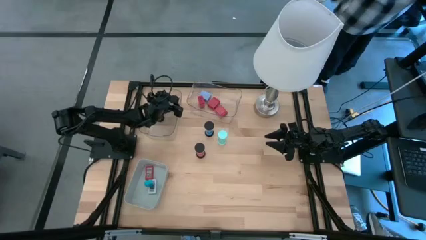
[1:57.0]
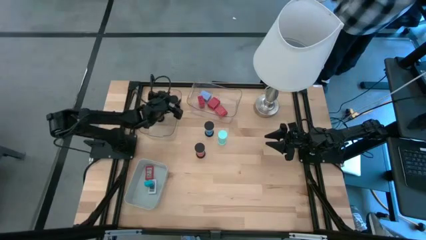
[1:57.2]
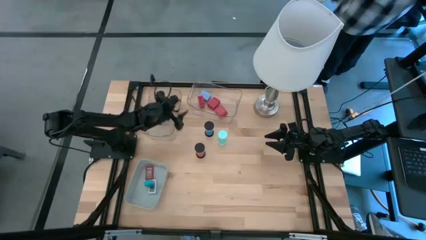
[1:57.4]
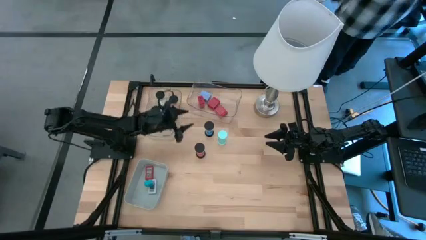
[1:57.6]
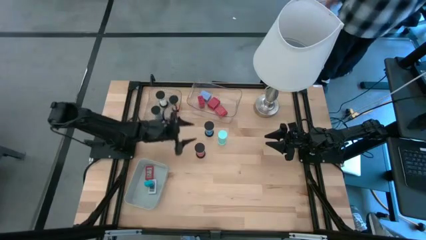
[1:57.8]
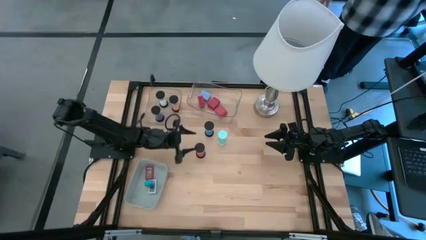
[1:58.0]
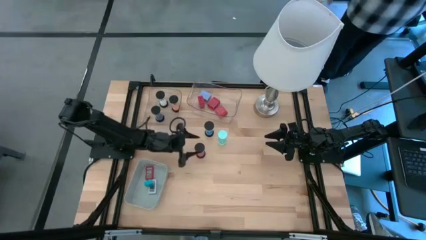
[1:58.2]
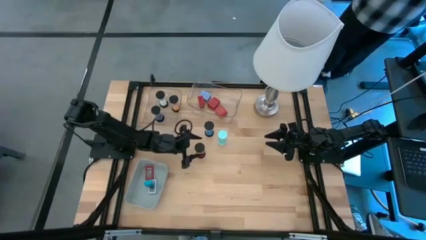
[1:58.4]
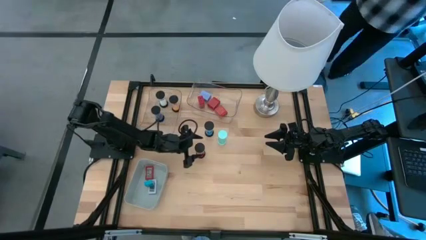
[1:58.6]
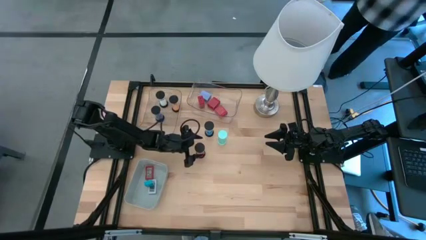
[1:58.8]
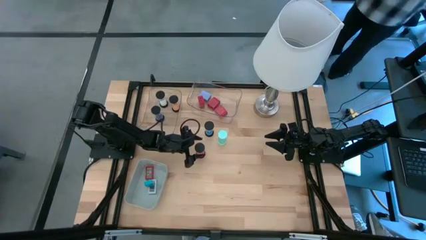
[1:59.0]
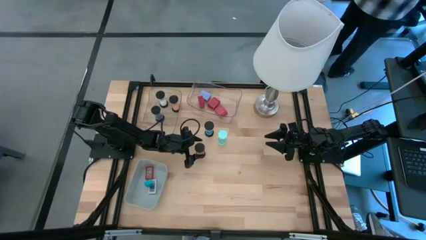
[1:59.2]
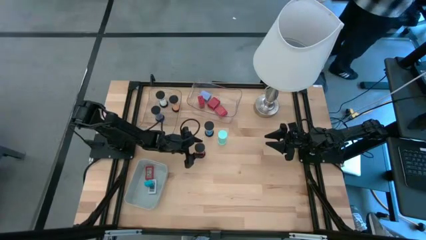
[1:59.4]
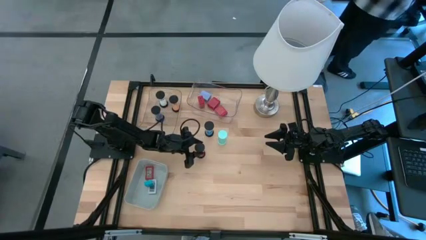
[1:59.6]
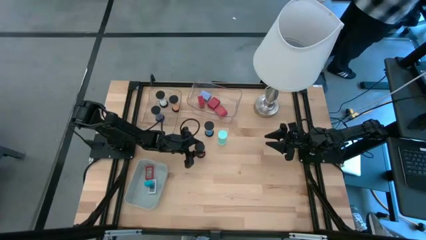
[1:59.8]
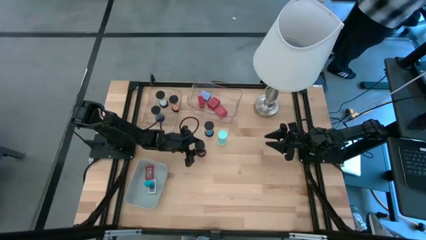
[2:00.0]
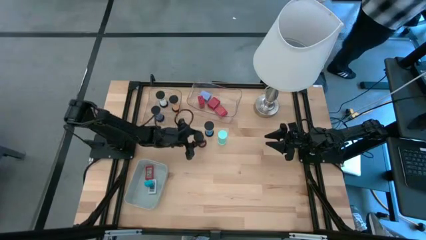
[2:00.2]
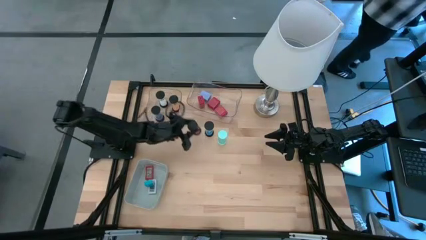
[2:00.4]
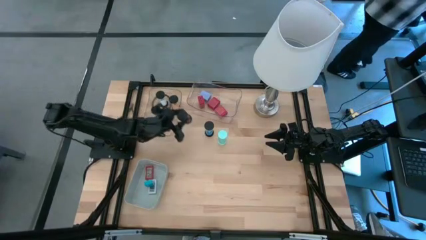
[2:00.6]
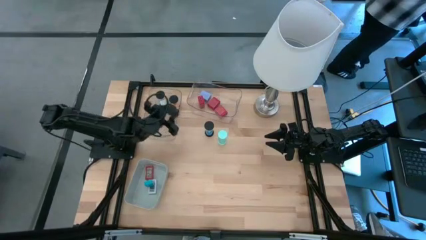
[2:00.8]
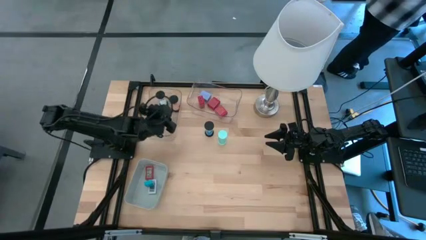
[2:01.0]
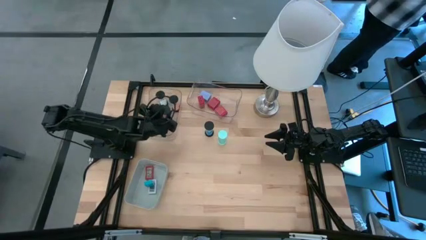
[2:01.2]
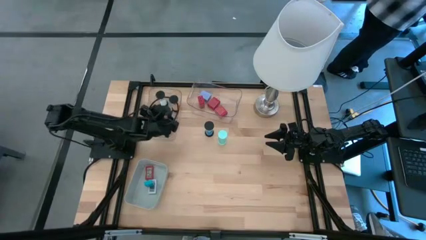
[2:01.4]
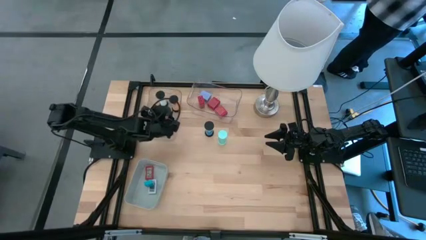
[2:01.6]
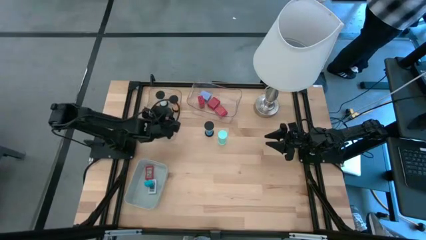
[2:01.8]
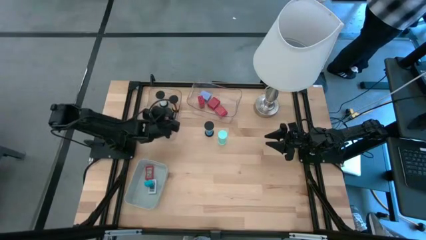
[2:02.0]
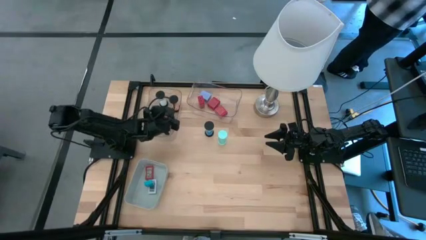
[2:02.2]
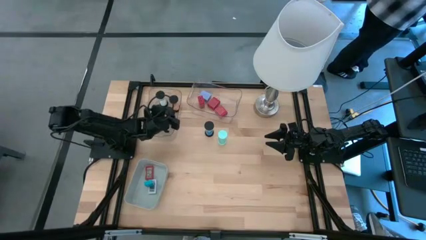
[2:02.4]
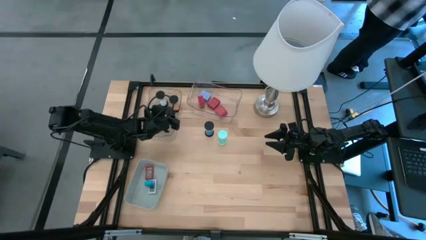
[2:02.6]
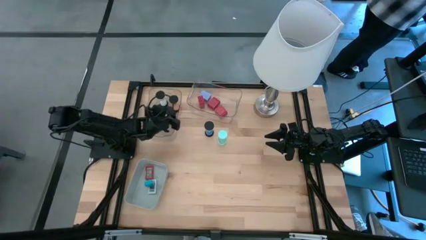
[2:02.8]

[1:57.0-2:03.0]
Task: Pick & Place Office items
Put the pink hourglass into the left transparent bin

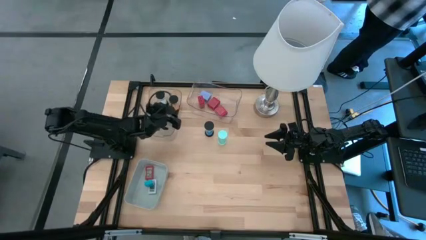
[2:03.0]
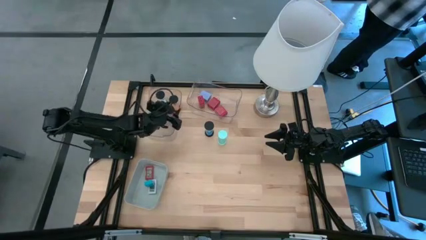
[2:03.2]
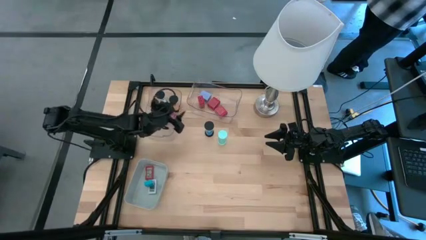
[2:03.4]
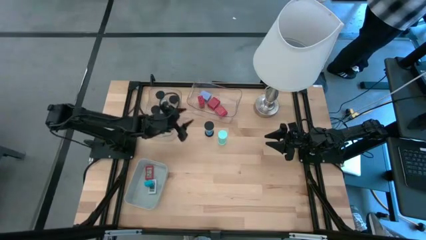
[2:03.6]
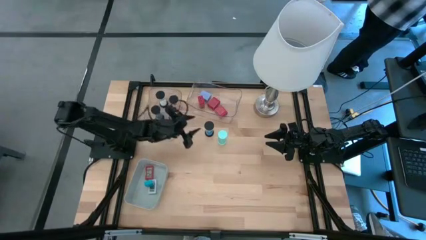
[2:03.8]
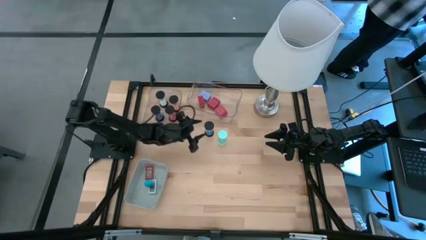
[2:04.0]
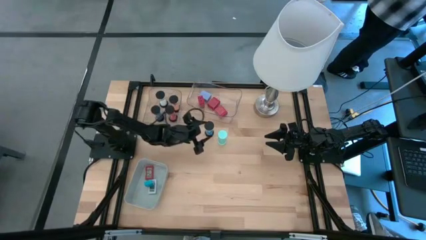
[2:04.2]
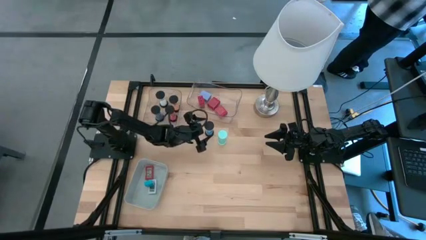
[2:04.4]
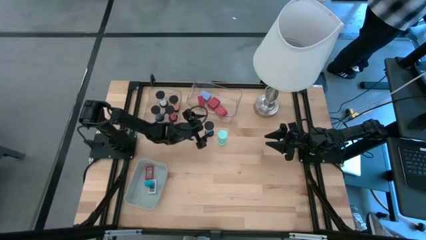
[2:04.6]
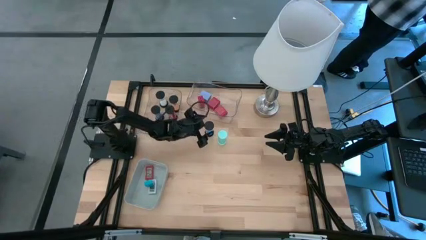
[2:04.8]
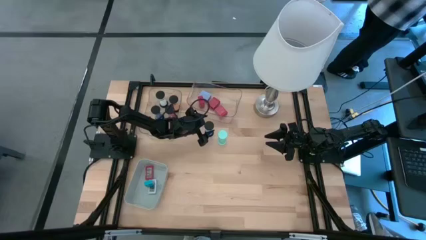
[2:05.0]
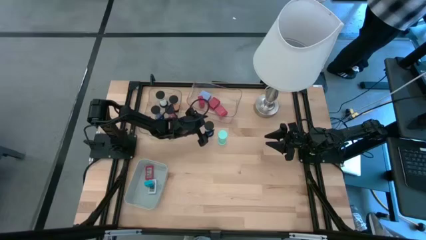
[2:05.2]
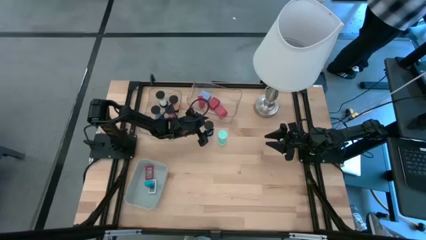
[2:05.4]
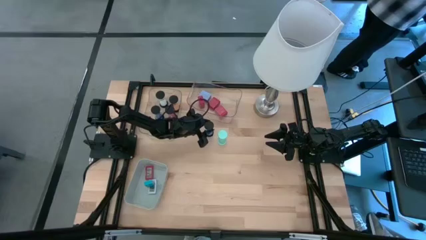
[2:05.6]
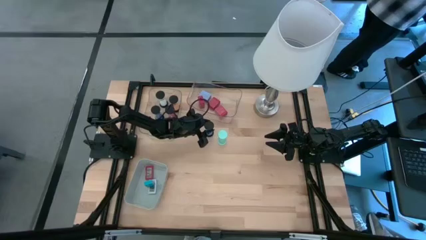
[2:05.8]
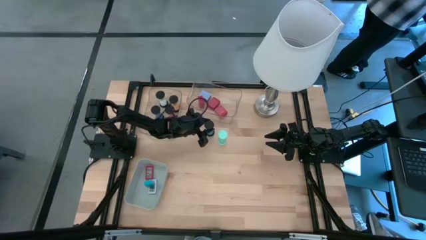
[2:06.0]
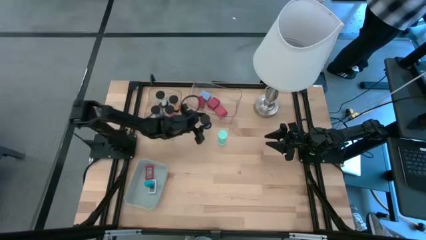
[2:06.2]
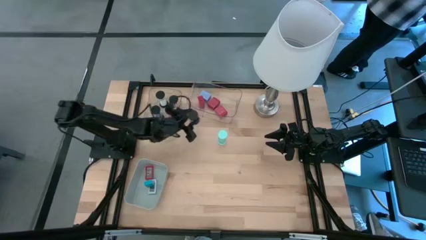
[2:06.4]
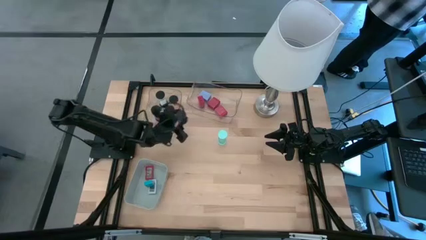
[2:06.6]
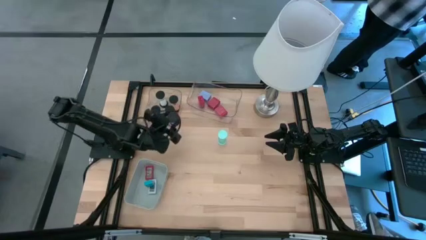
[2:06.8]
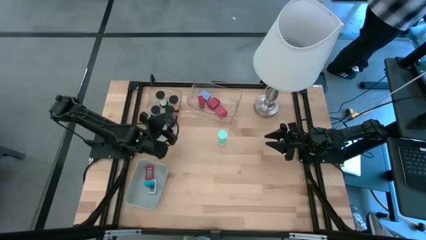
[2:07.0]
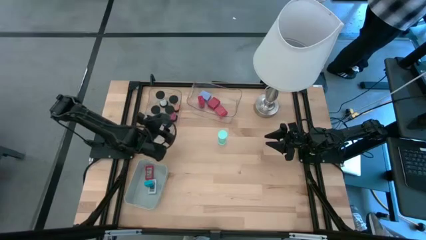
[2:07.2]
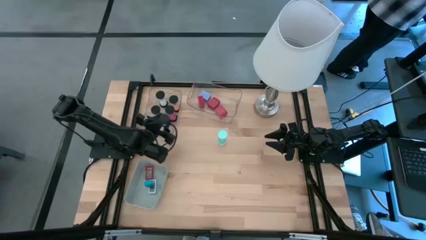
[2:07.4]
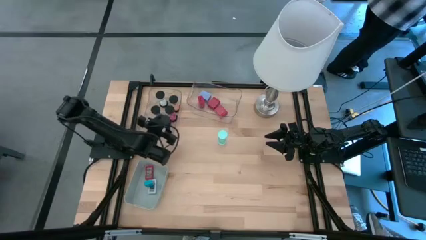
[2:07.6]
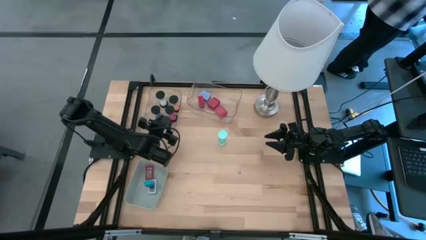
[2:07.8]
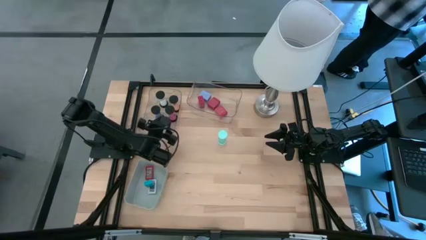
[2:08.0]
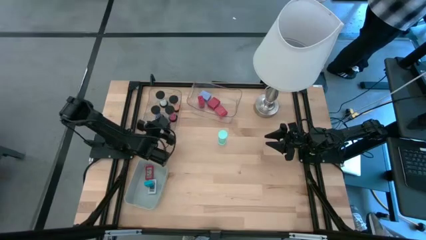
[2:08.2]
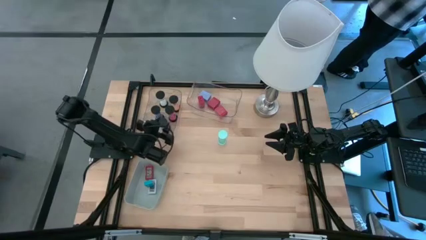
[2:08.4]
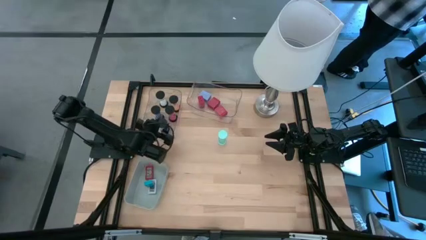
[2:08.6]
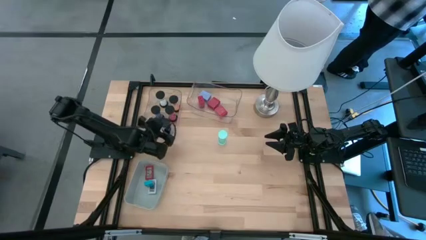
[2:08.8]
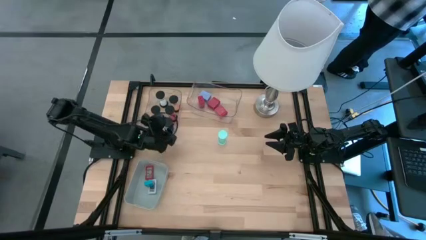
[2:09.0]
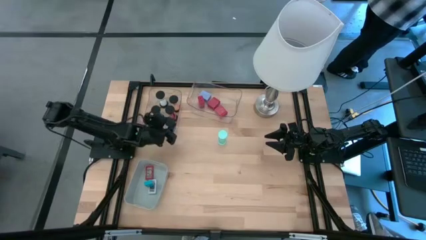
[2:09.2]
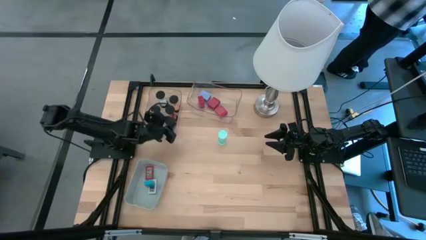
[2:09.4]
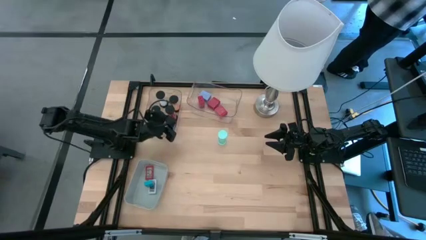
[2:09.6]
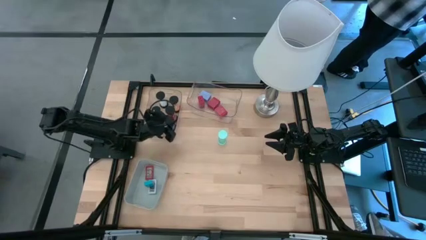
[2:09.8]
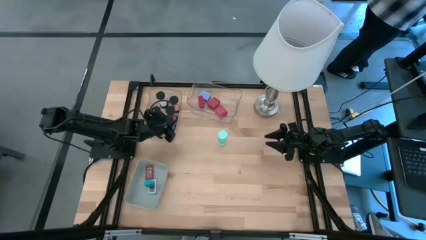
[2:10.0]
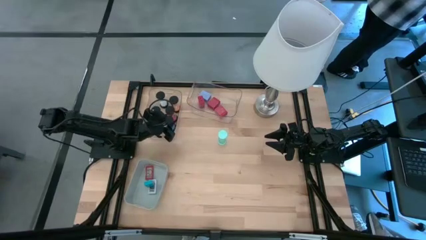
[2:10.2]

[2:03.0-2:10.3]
Put the blue hourglass into the left transparent bin

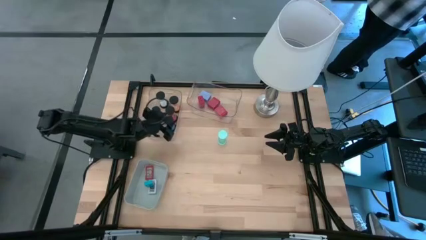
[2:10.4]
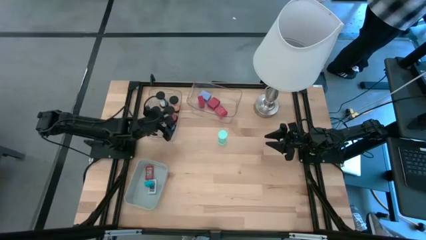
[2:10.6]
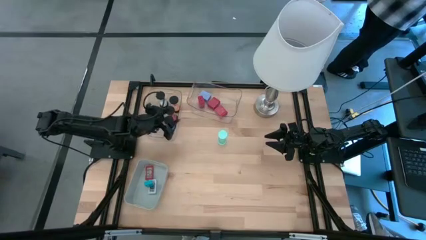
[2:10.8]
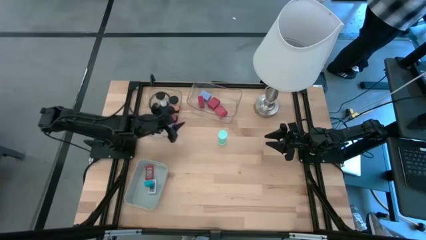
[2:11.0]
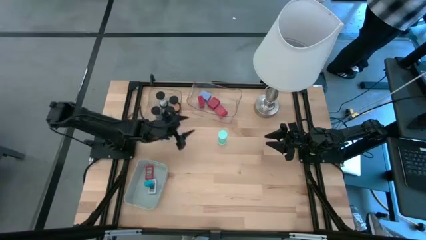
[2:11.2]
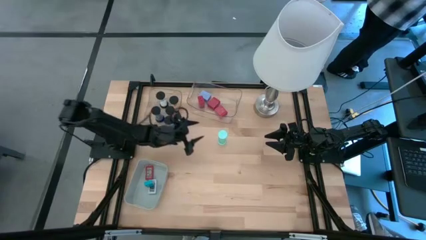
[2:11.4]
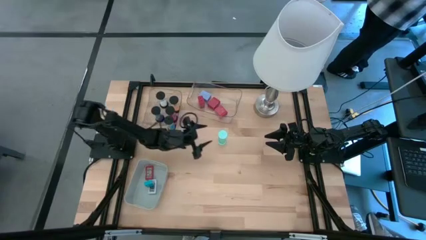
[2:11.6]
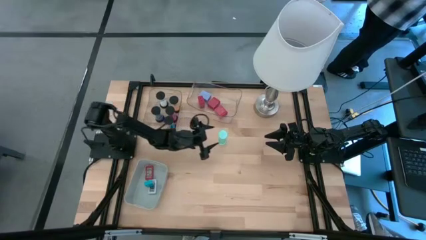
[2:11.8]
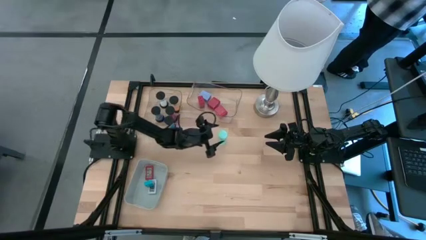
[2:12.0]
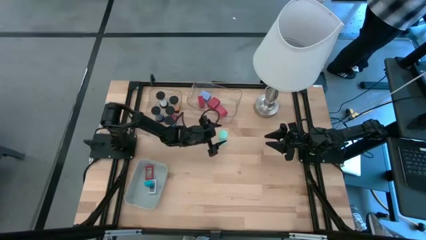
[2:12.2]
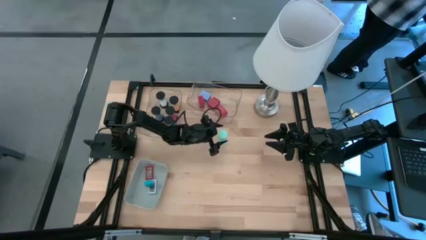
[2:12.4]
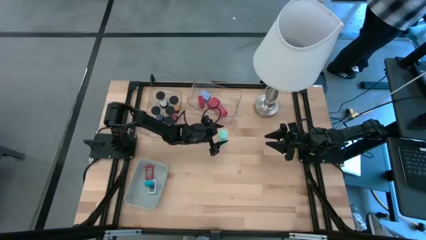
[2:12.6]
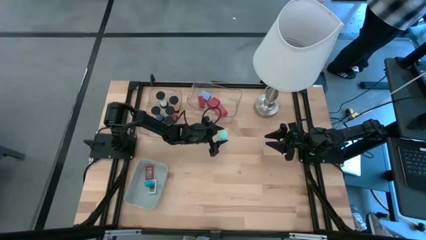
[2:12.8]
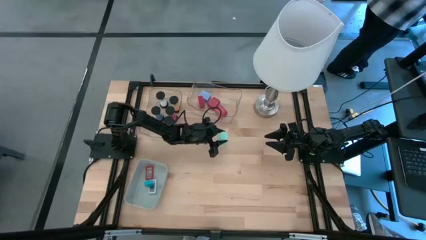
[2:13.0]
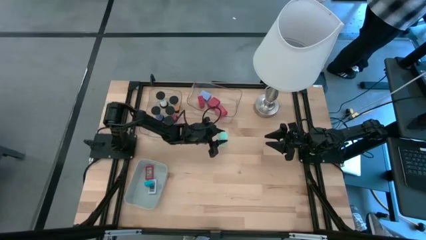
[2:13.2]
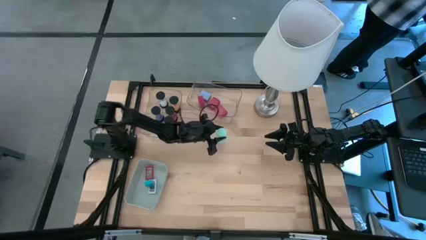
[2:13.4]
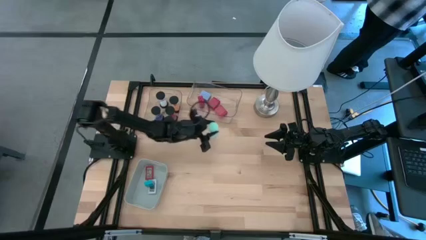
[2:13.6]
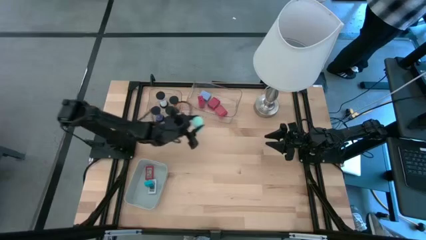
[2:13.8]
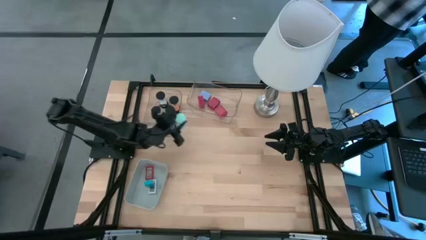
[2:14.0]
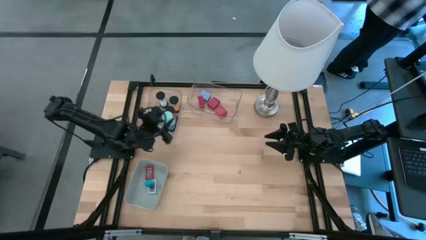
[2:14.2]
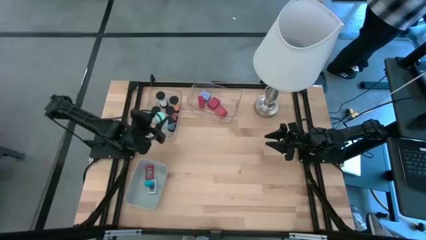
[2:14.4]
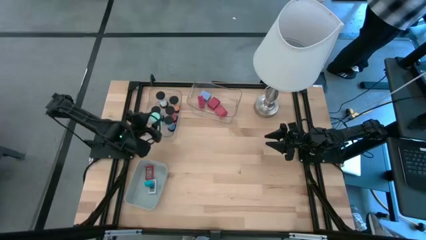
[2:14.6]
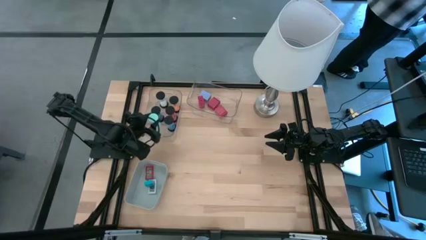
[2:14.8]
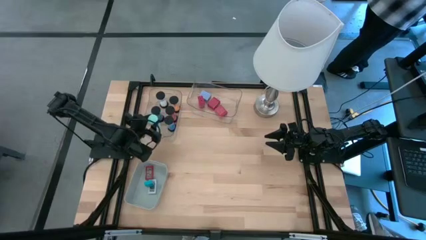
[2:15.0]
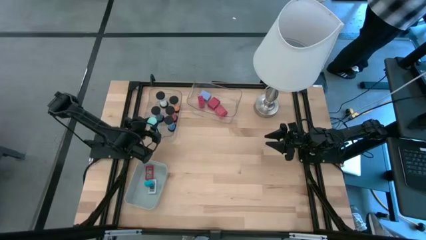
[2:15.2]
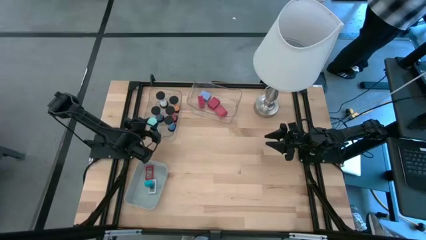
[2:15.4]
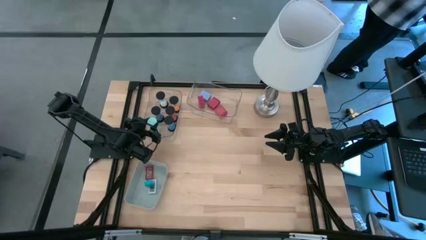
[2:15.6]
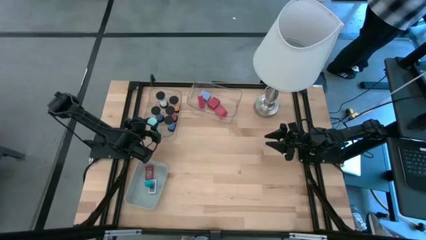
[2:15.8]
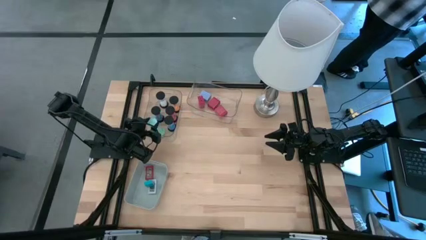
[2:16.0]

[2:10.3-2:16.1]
Put the light blue hourglass into the left transparent bin
